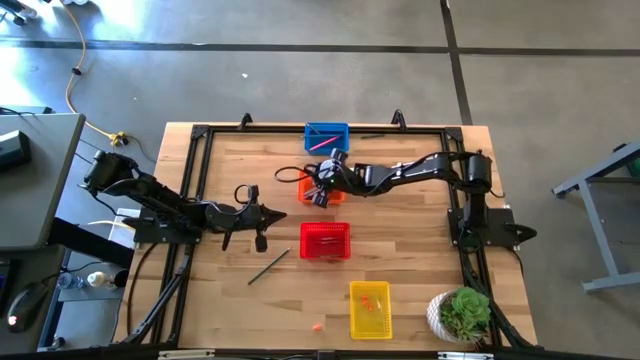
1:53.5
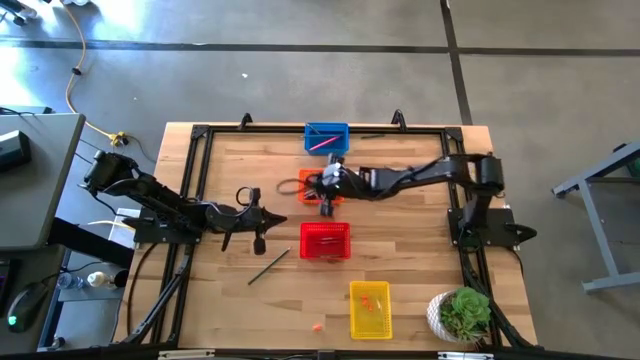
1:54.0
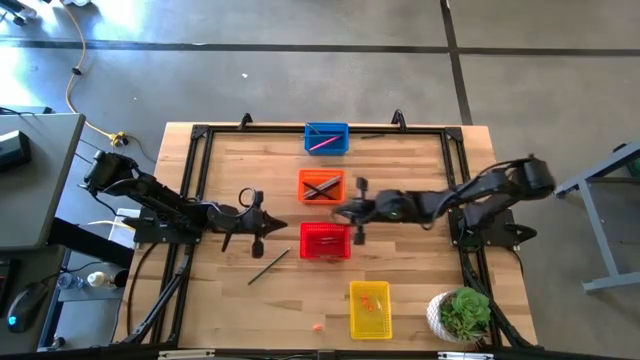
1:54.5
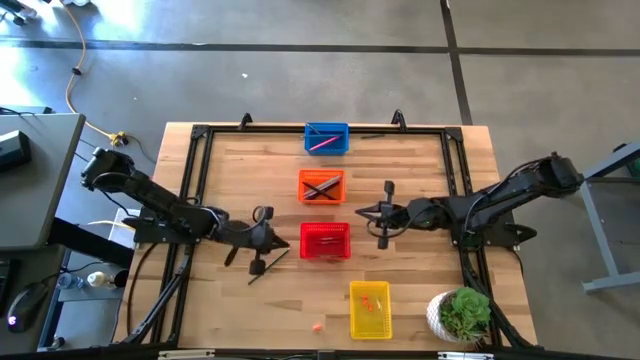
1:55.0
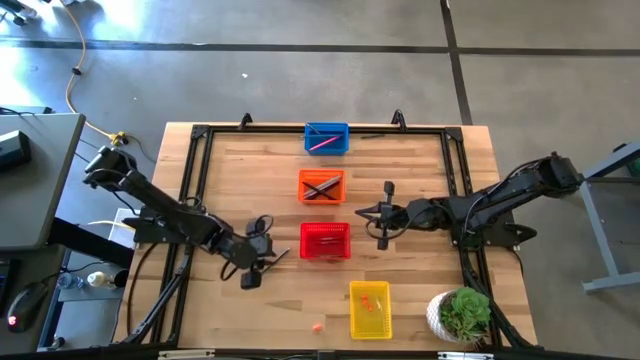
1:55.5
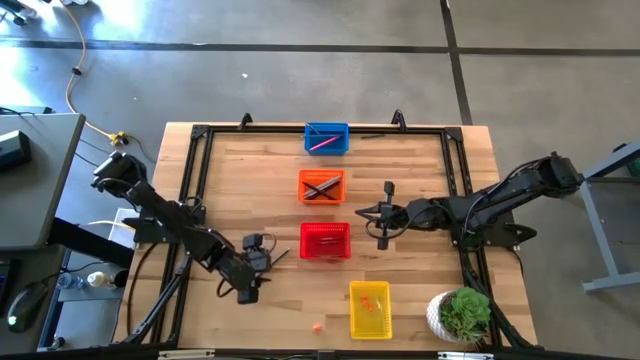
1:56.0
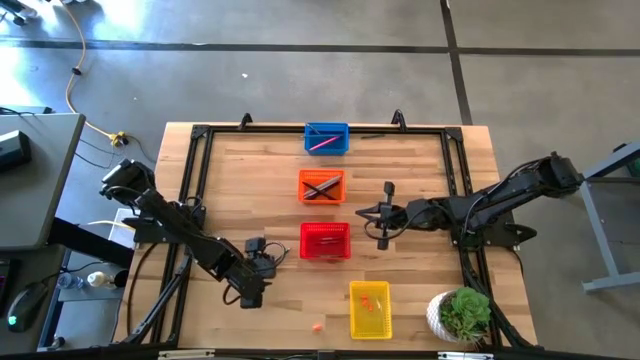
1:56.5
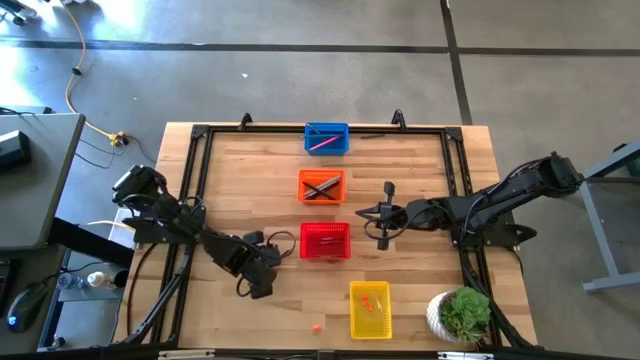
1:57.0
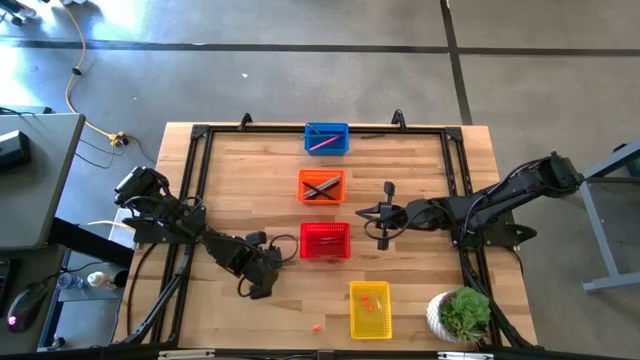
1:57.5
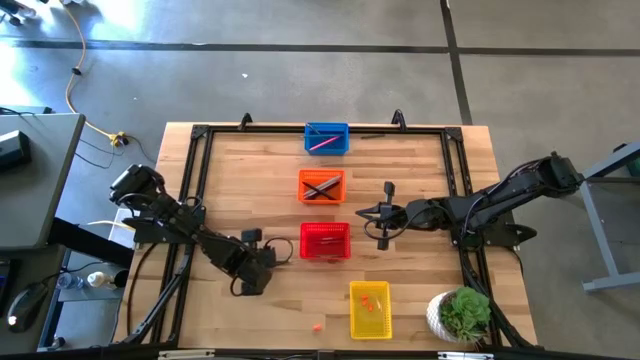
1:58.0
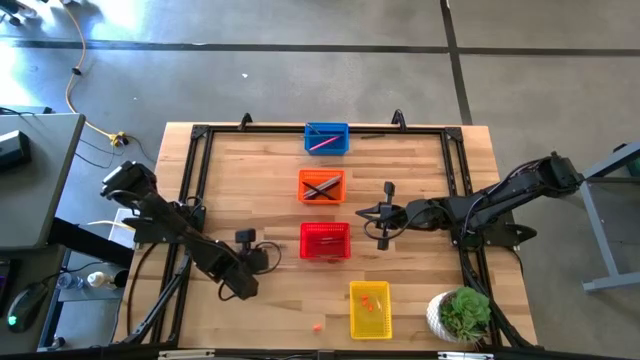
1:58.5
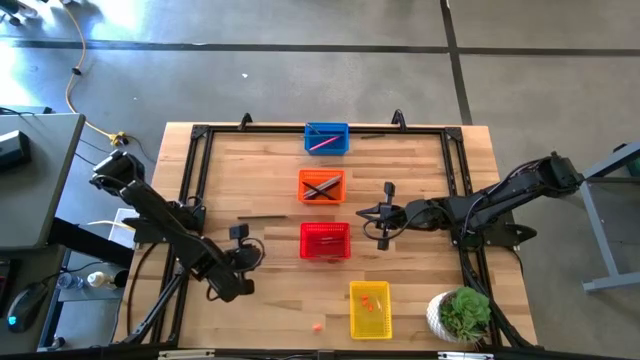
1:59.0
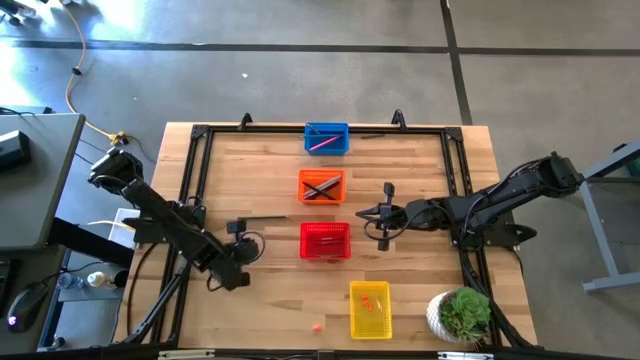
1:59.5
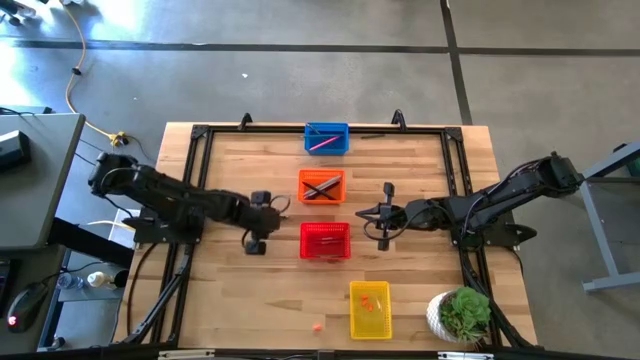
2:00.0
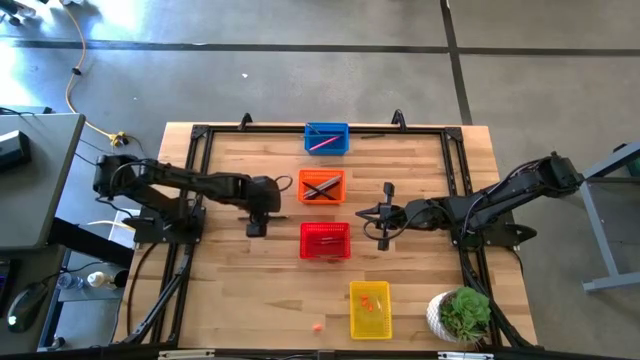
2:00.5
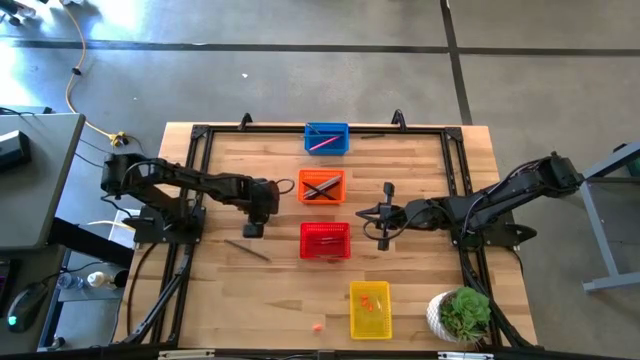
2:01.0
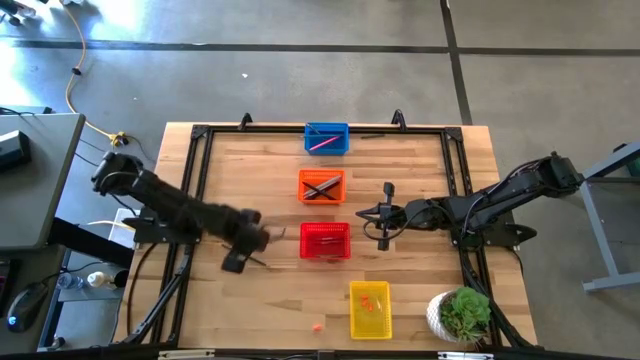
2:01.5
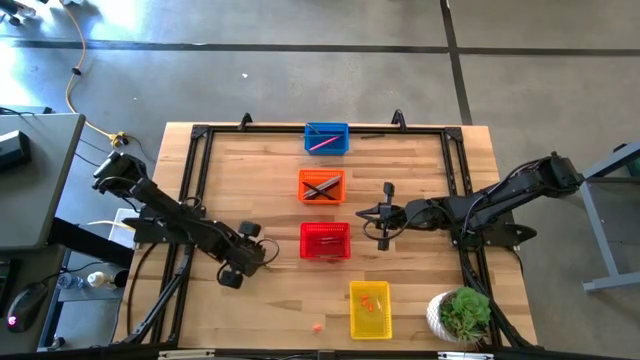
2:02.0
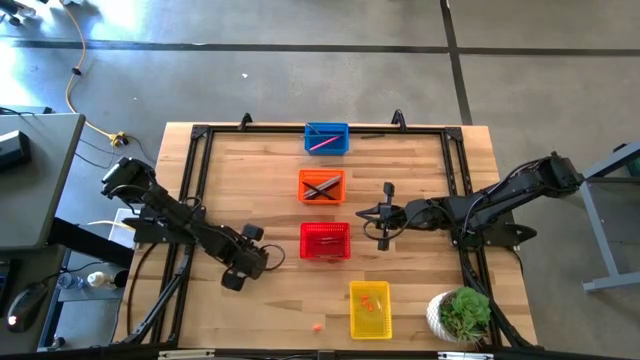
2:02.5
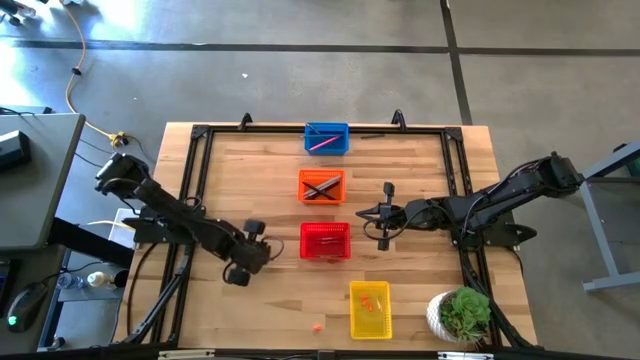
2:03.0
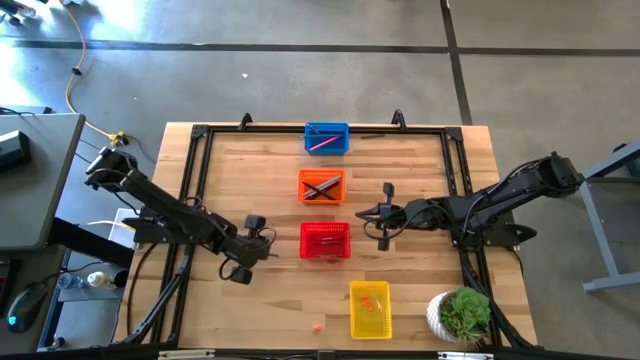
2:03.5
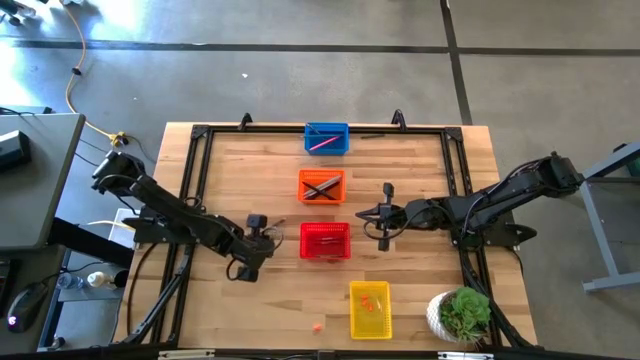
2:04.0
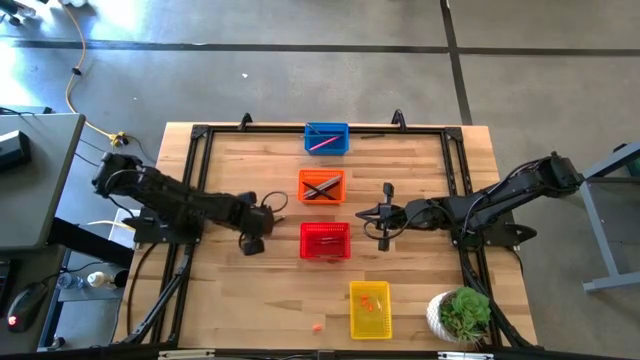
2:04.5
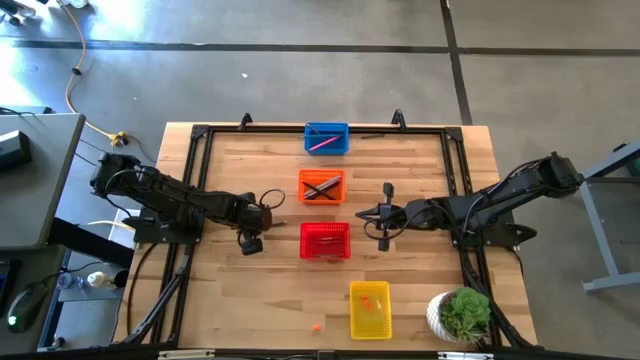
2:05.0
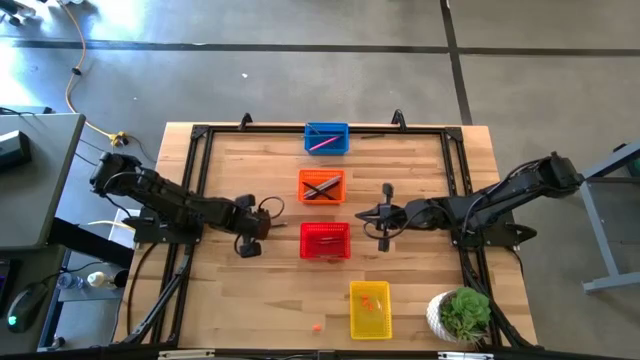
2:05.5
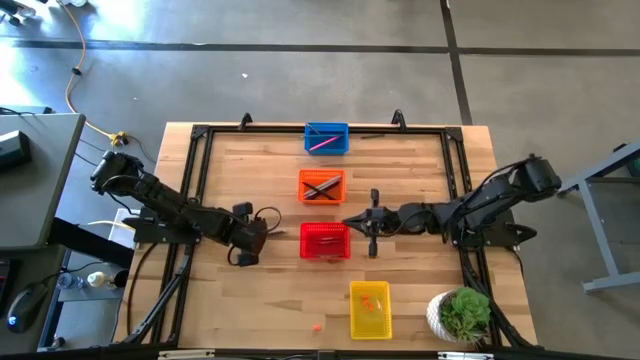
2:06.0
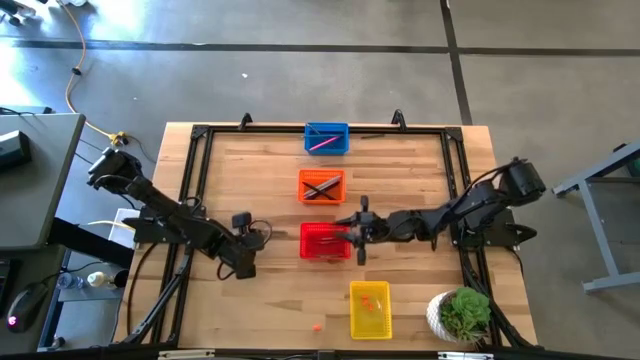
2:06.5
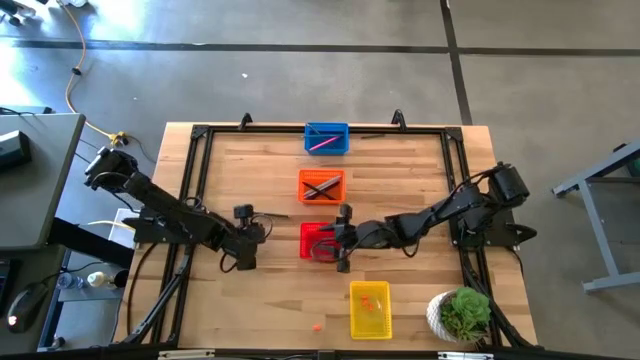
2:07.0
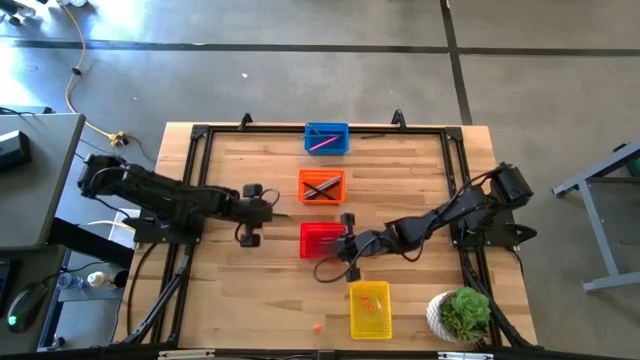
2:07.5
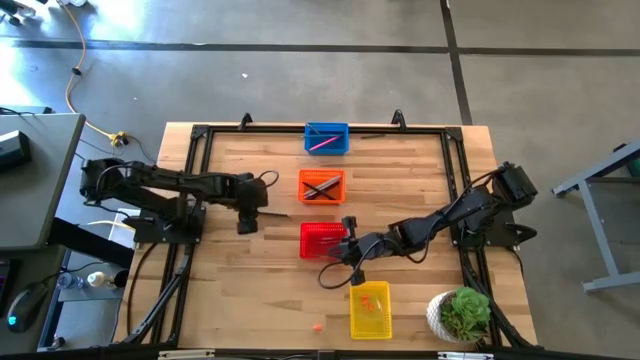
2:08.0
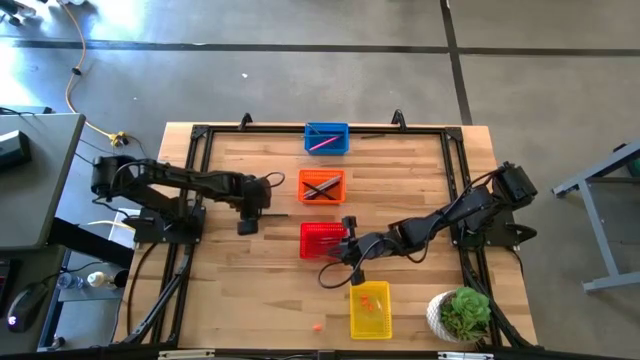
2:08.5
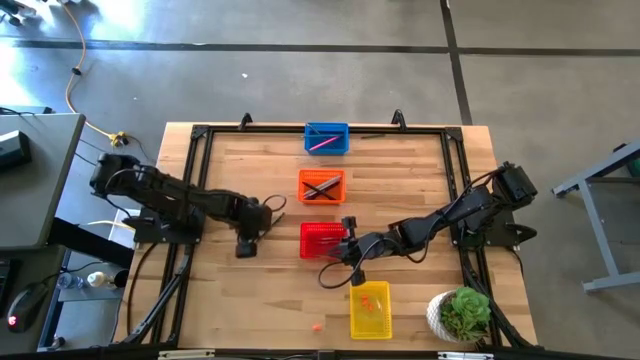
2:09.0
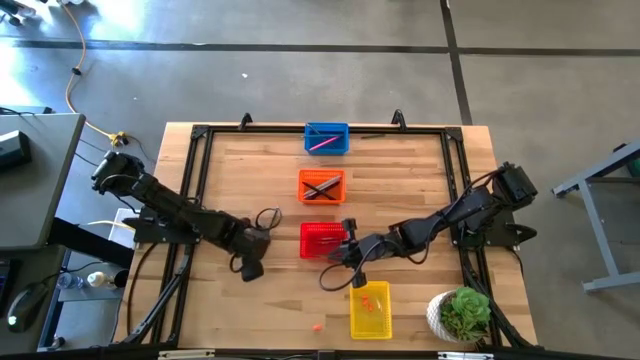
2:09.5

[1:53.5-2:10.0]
Task: Sort crayons/erasers/pens/pencils in bins
Put the green pencil into the blue bin

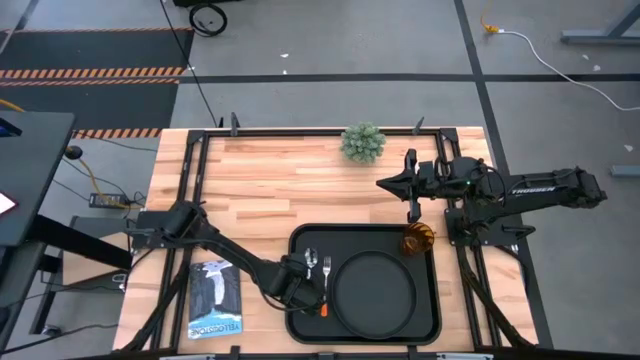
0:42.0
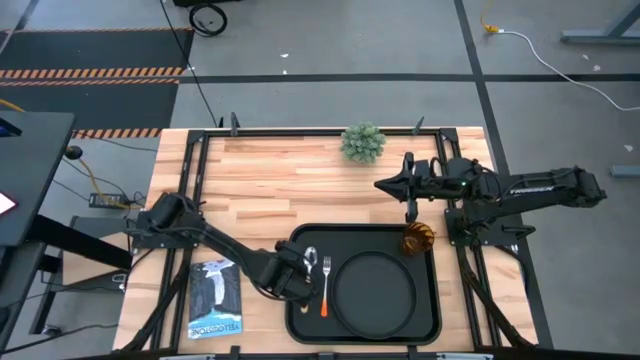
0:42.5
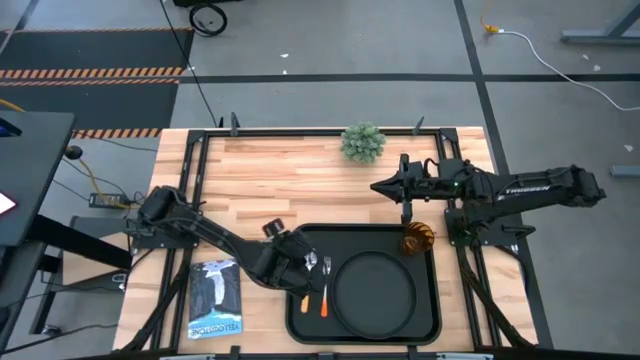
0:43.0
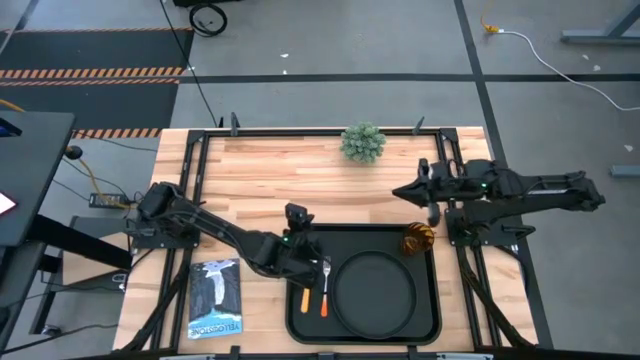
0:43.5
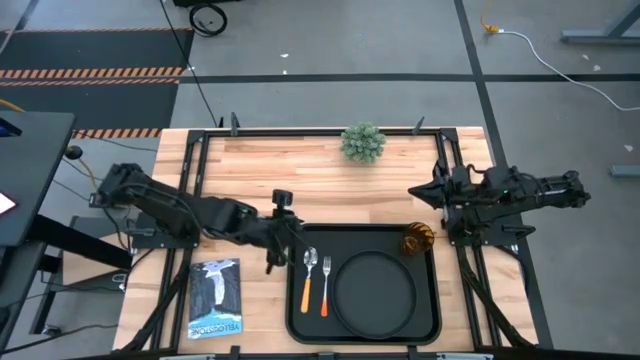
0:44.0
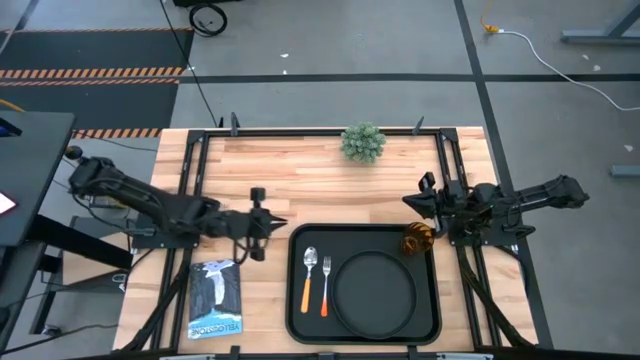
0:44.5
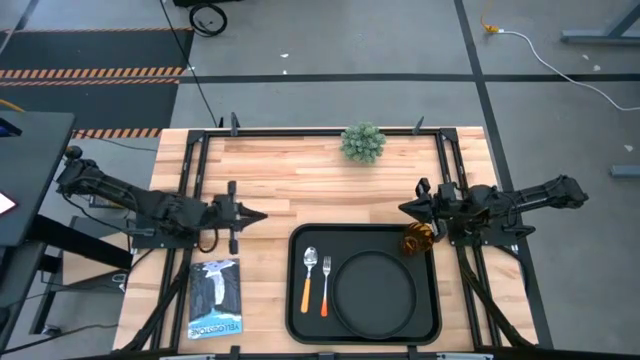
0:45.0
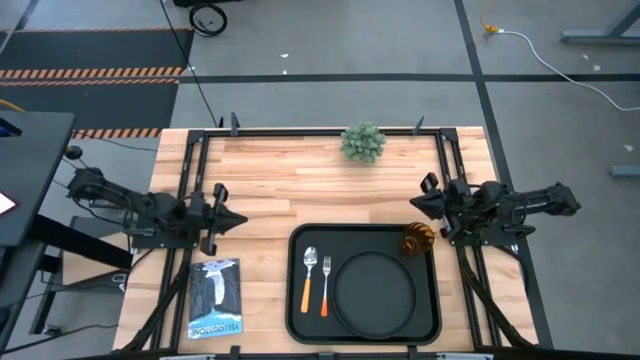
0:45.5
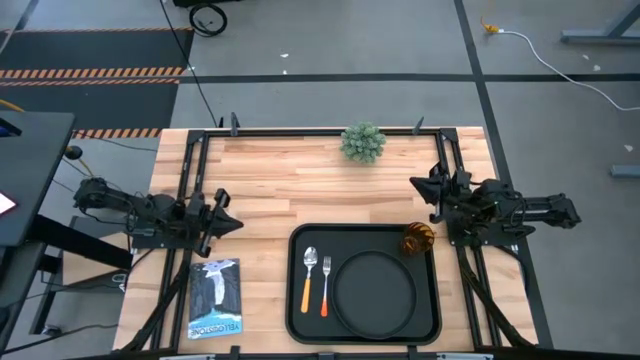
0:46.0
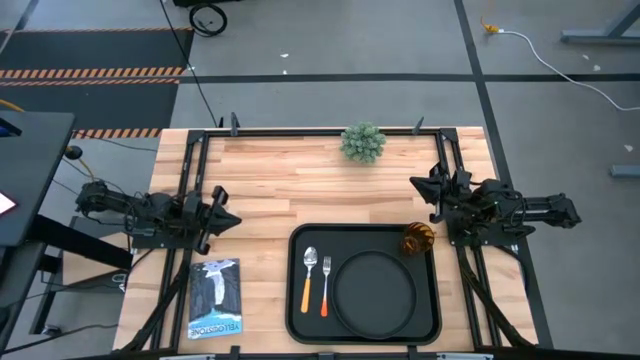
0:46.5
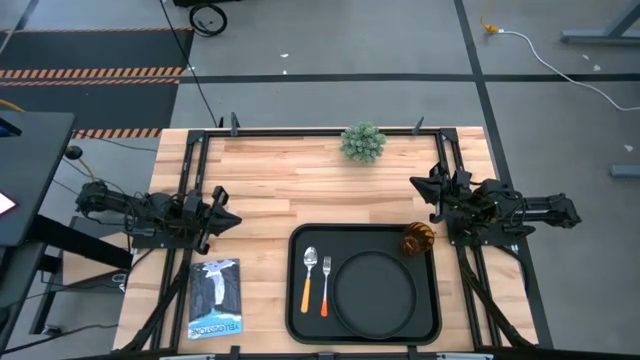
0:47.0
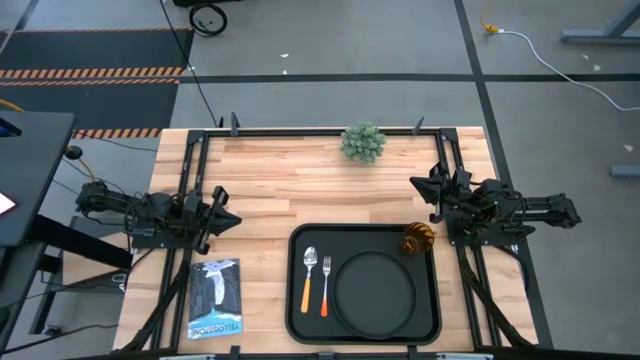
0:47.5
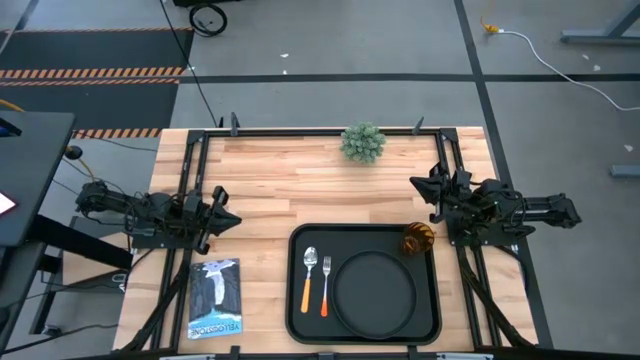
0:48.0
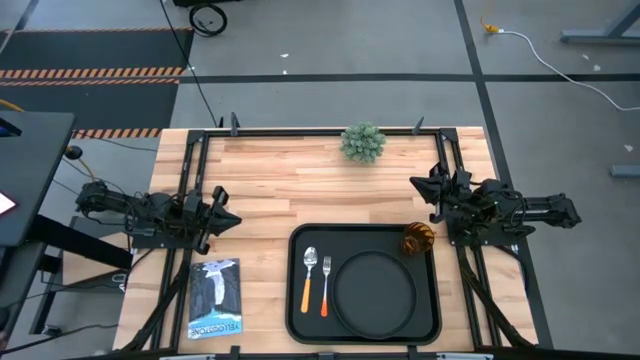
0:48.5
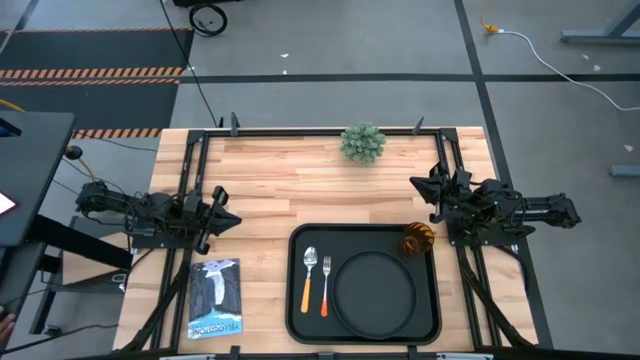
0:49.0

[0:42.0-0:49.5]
Task: Pick and place plate/cup/fork/spoon on tray
Return to Home Position
